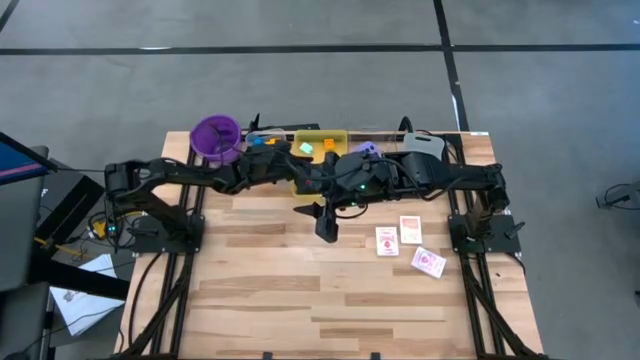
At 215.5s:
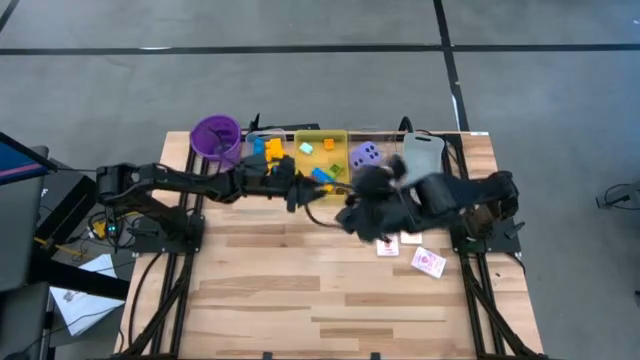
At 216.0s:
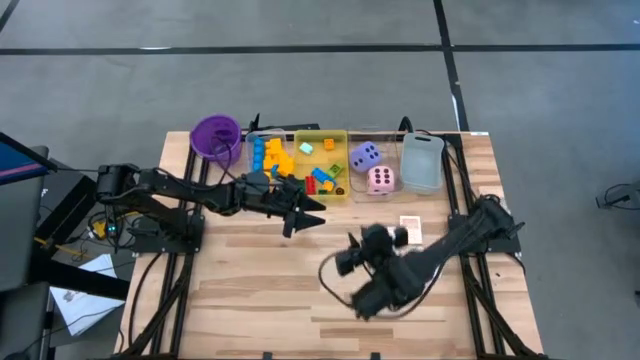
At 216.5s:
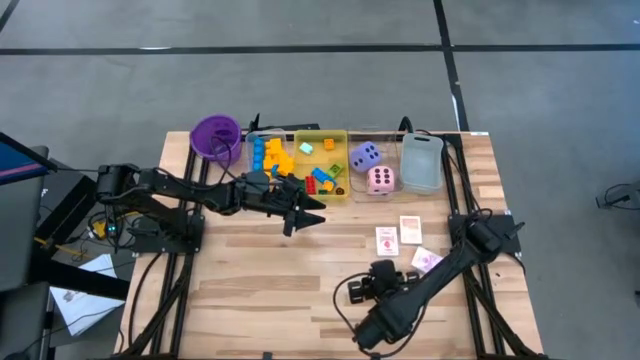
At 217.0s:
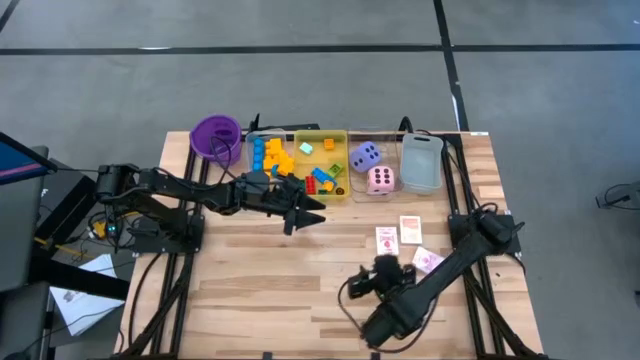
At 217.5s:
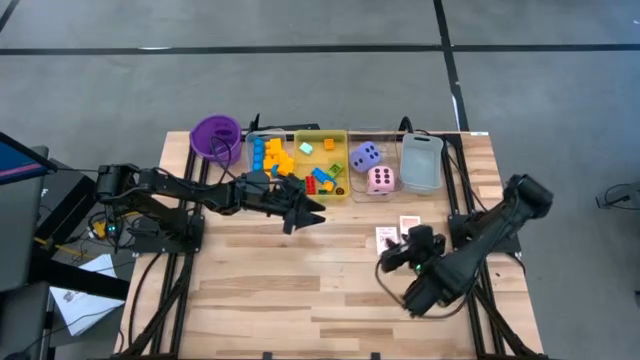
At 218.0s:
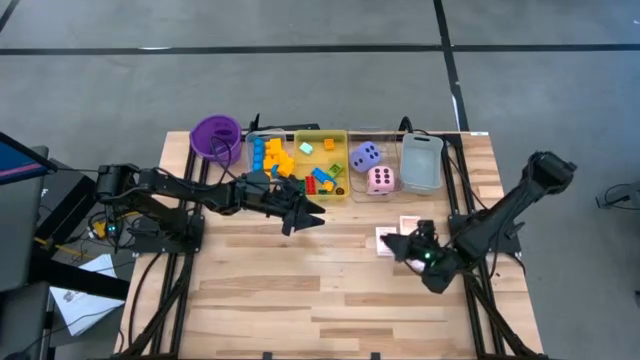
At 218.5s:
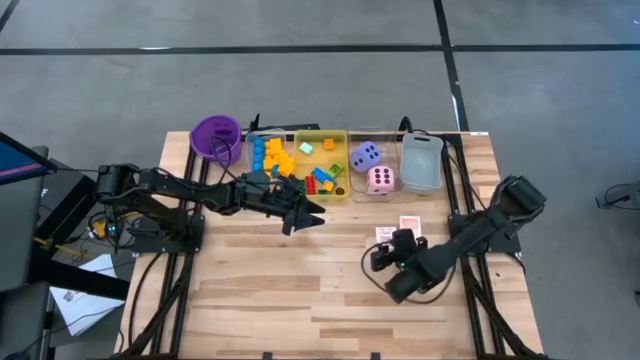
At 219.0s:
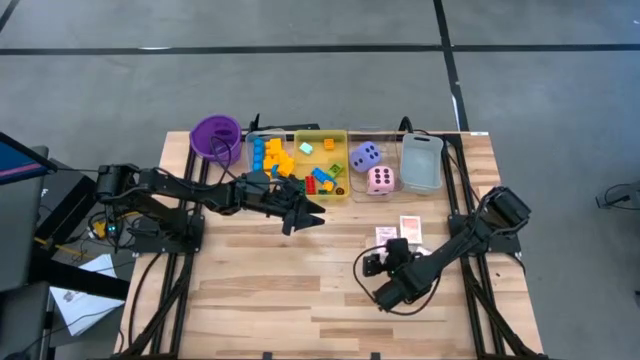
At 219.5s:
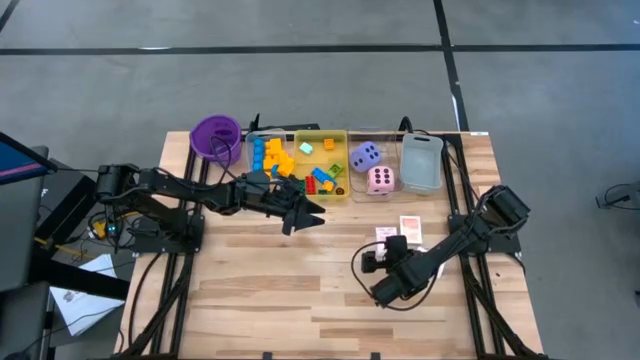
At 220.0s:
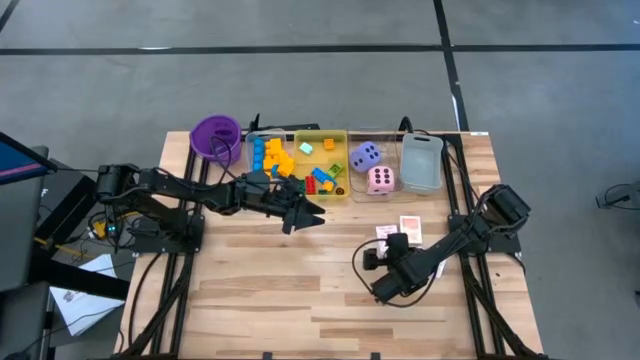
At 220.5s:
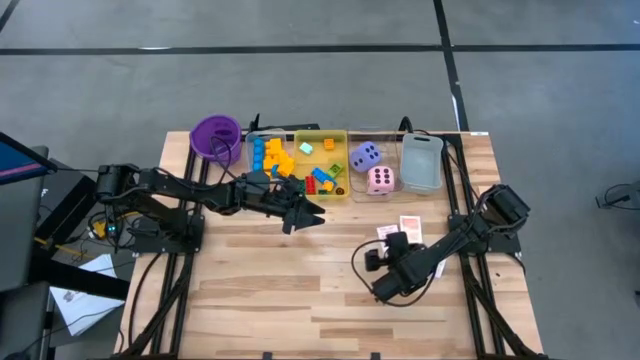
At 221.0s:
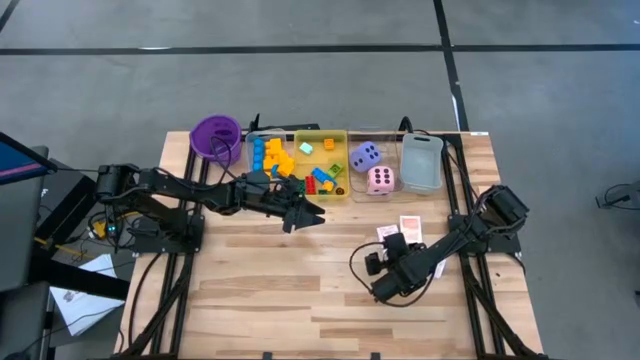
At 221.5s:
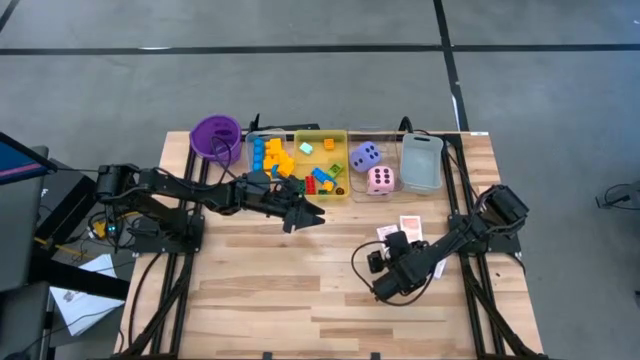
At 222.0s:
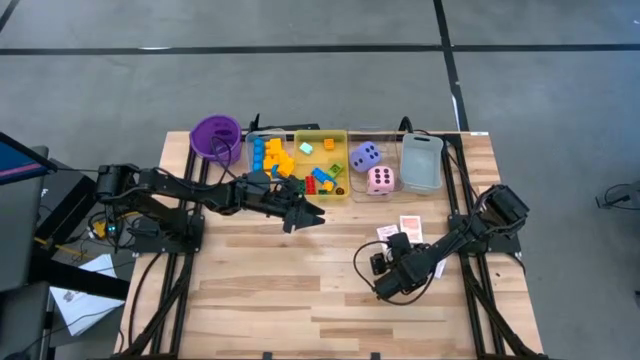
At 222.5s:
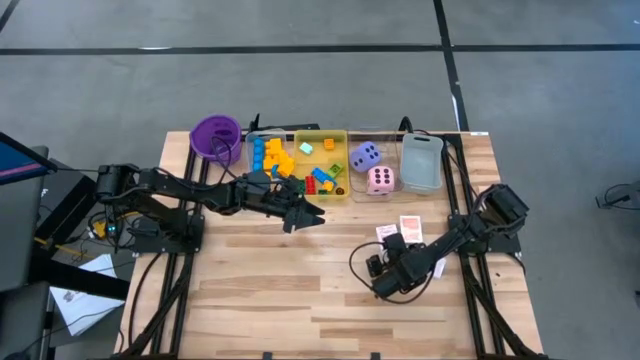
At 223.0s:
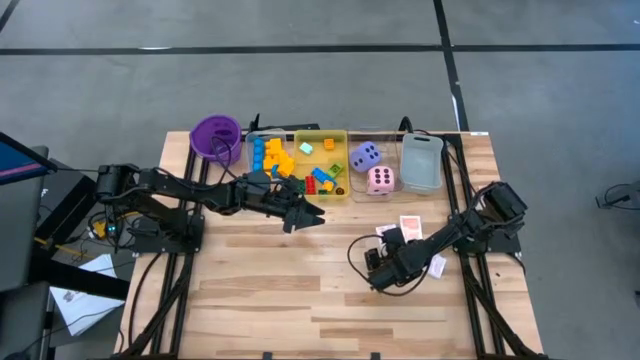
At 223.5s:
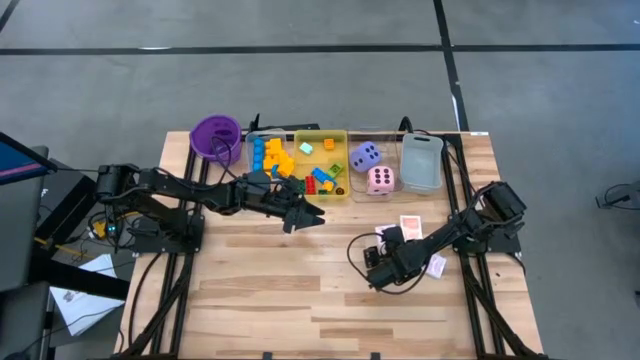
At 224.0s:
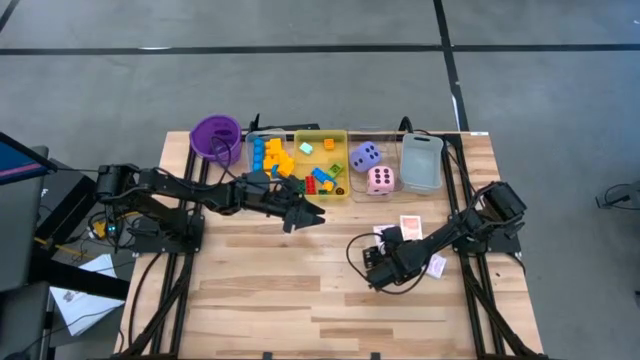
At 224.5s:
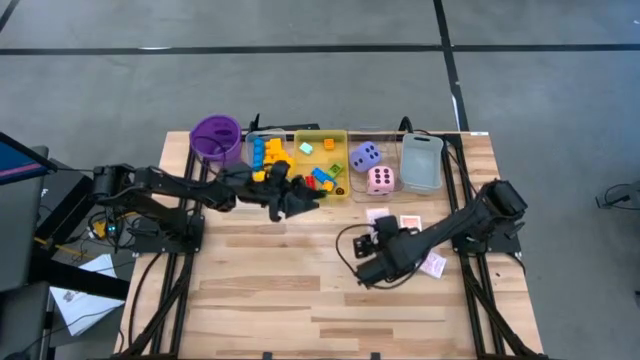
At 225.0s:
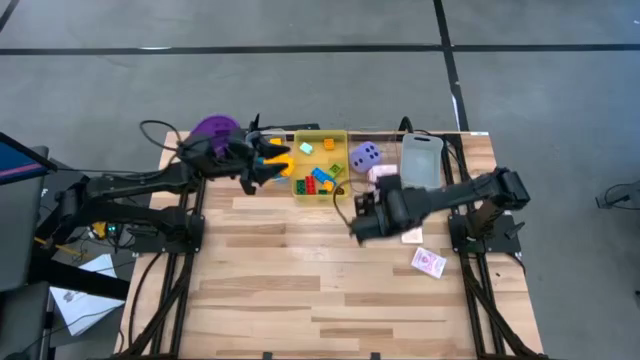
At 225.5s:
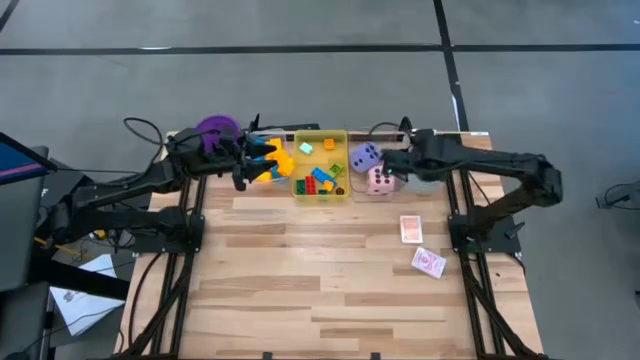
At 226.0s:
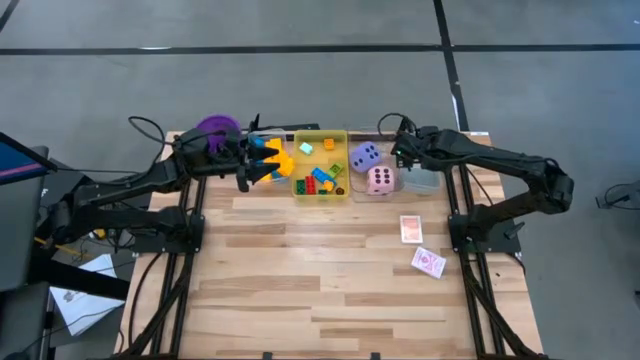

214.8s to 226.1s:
Task: Pick & Place Toys
Put the red deck of cards into the gray bin

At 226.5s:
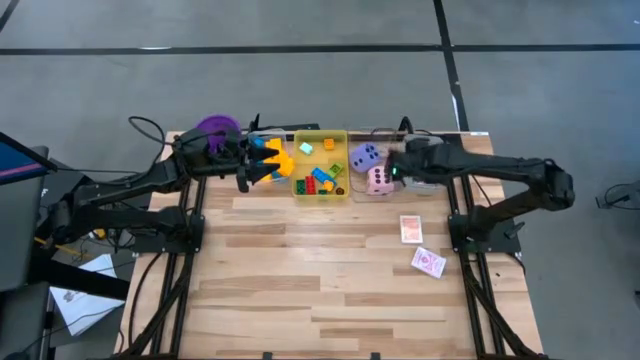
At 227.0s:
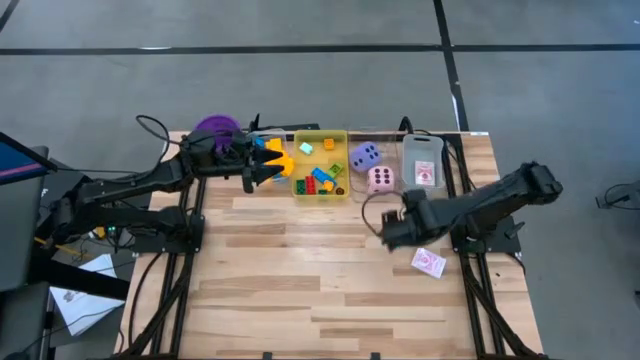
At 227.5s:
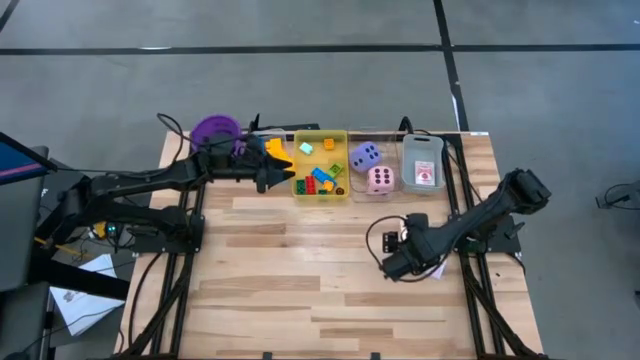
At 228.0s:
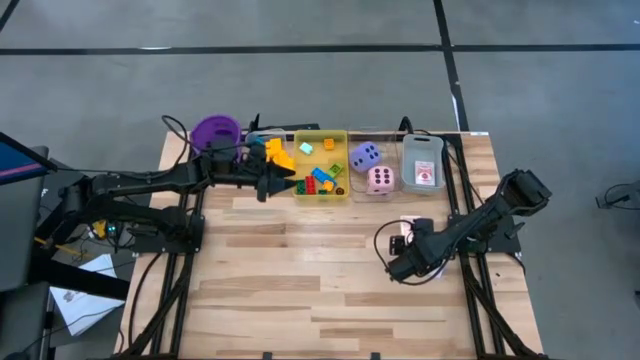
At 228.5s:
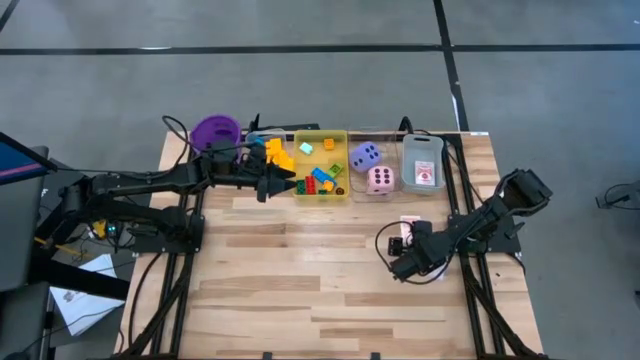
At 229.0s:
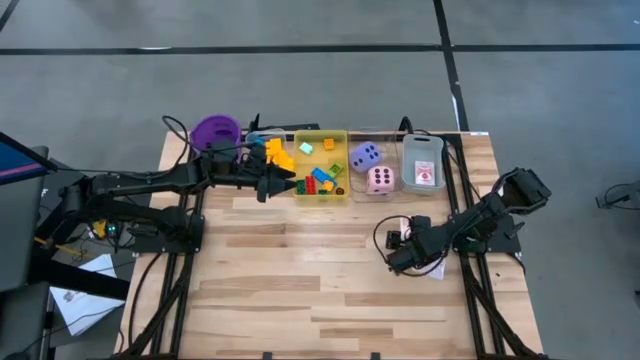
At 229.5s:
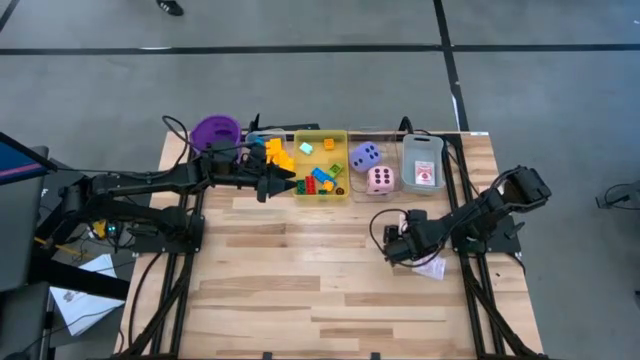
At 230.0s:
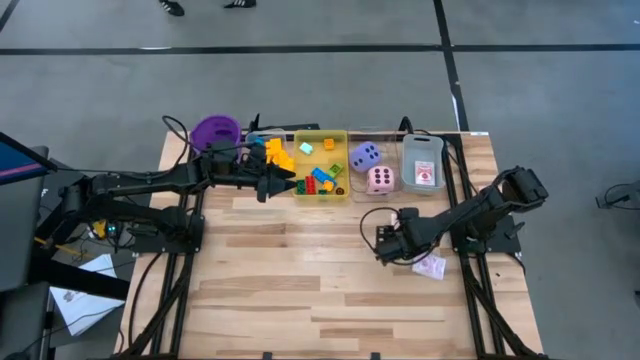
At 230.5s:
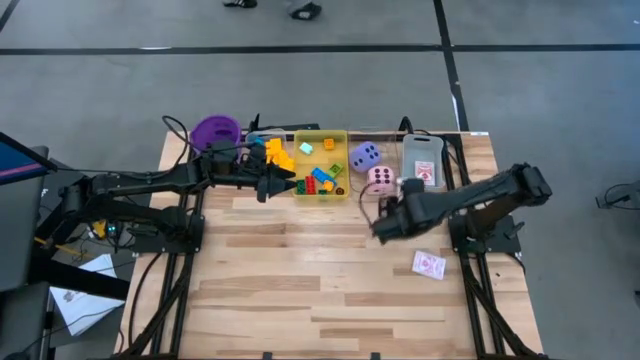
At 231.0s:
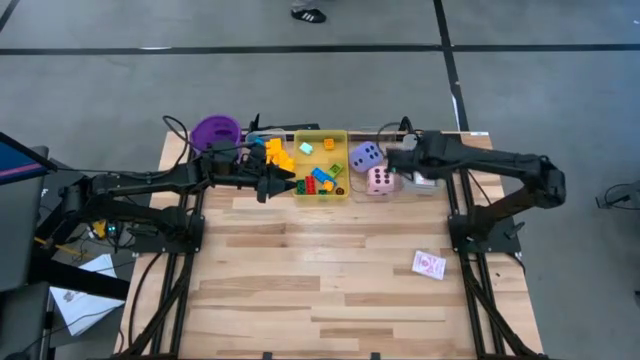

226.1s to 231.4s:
Put the orange deck of cards into the gray bin

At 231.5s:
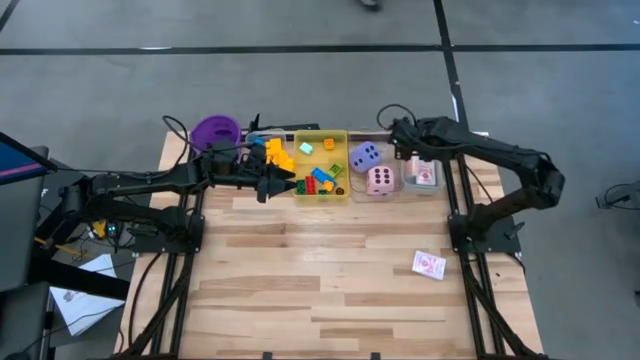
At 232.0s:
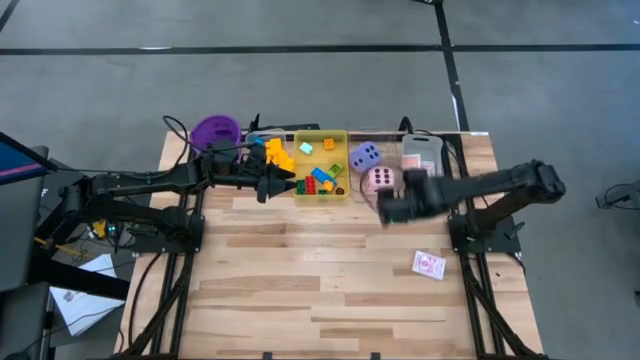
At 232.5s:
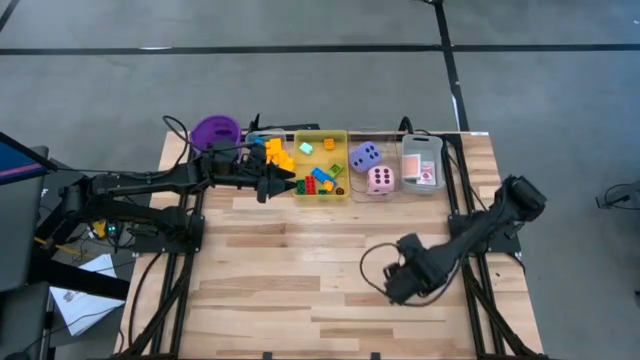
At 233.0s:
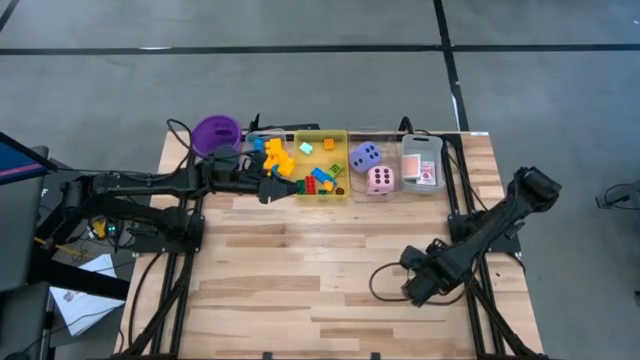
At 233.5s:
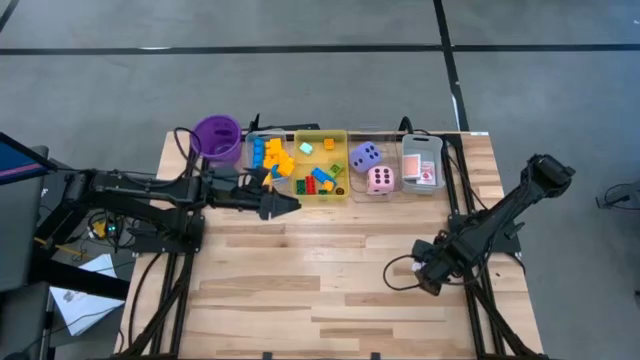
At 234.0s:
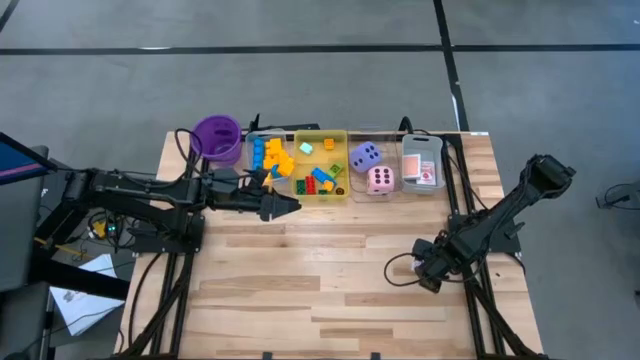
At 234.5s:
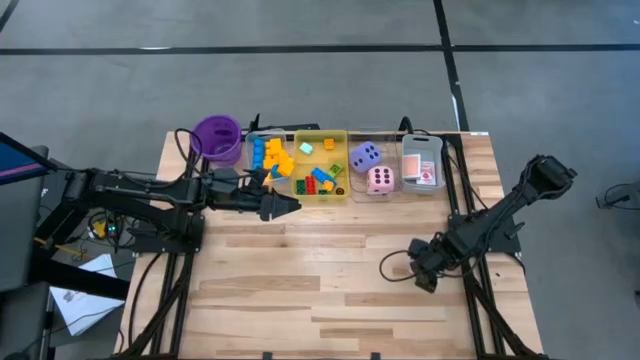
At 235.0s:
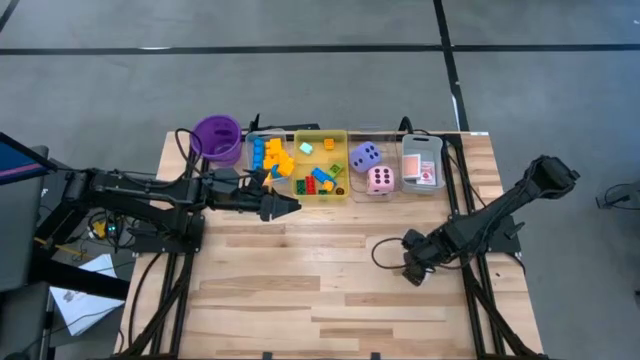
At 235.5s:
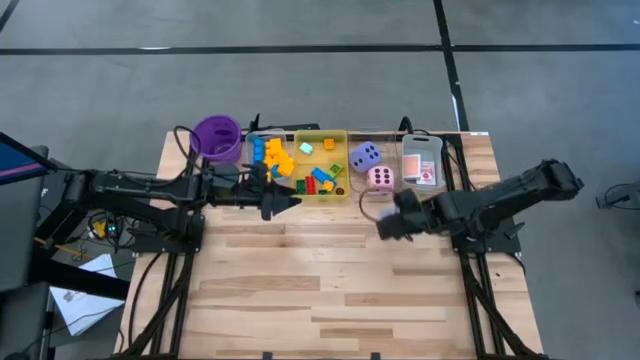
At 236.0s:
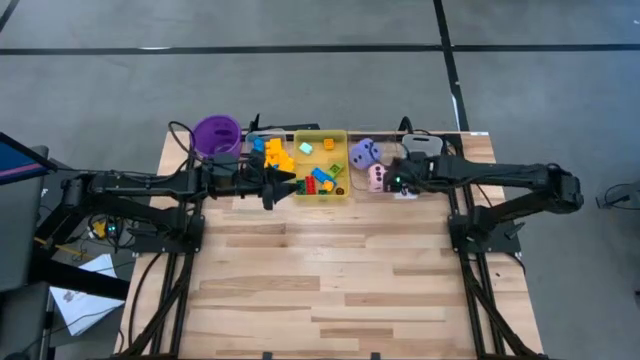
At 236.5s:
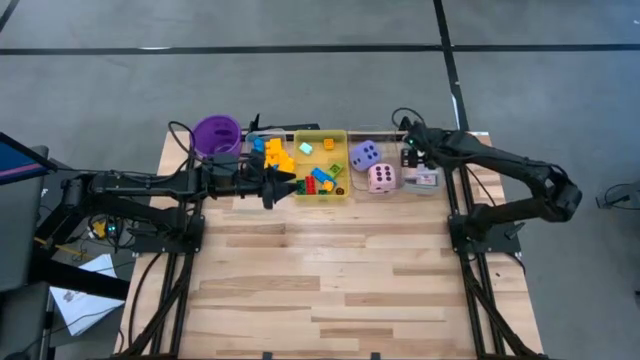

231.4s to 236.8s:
Put the pink deck of cards into the gray bin
